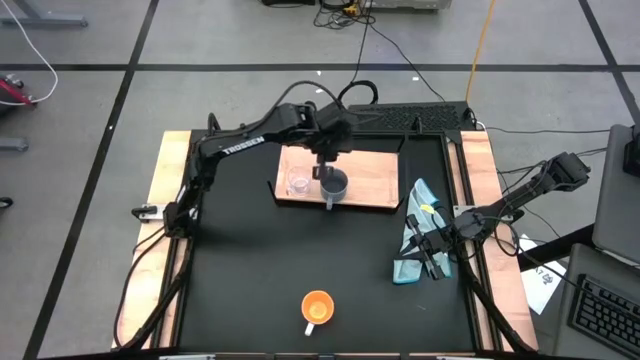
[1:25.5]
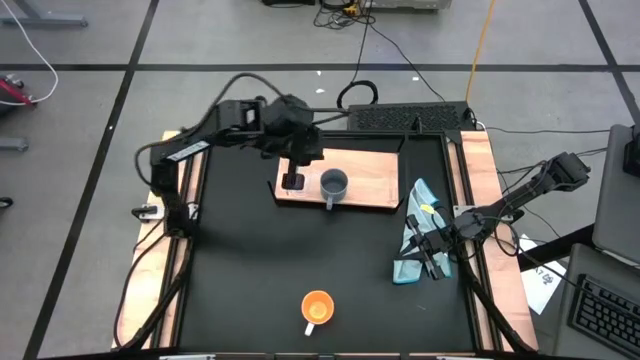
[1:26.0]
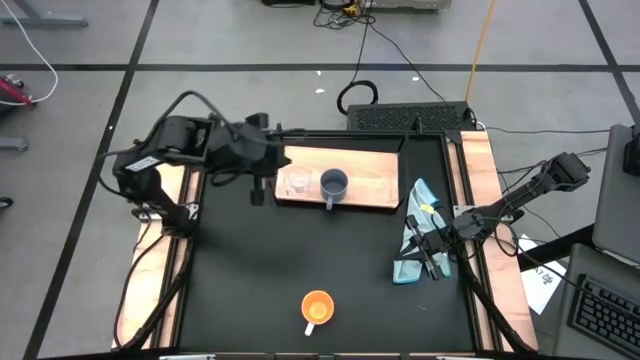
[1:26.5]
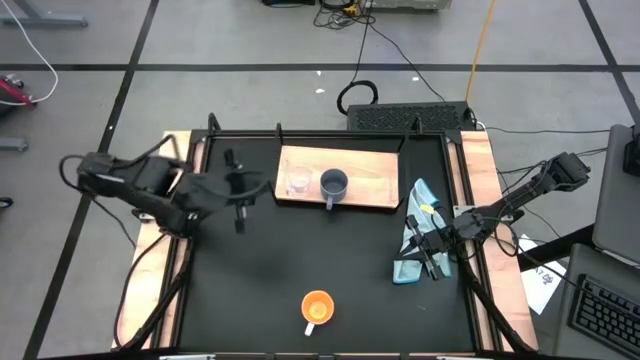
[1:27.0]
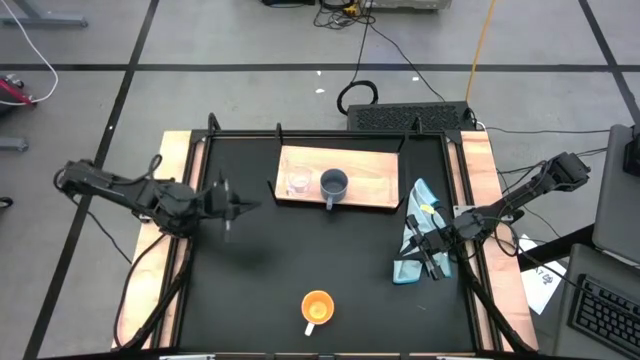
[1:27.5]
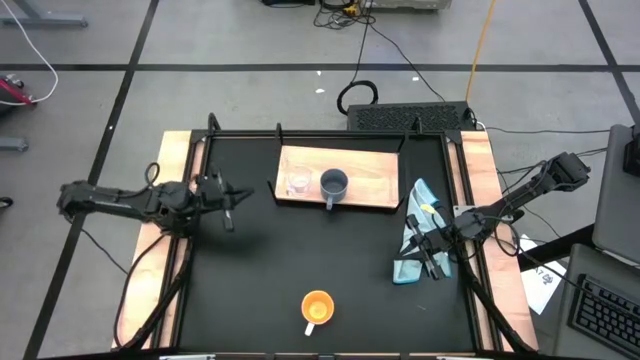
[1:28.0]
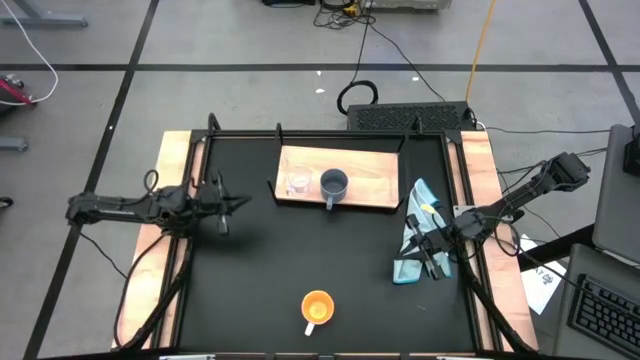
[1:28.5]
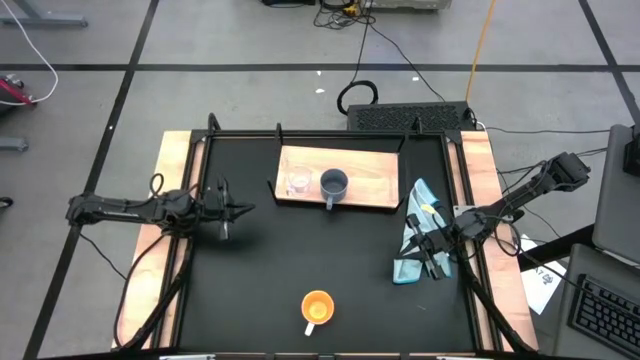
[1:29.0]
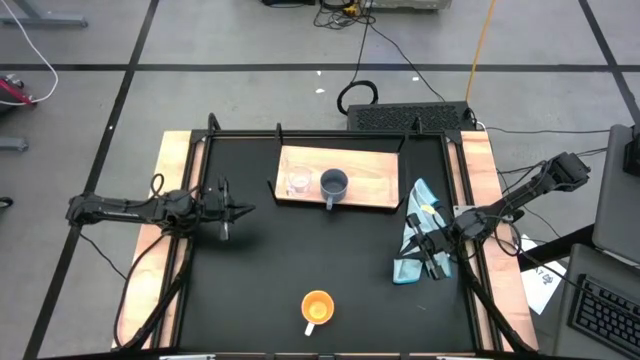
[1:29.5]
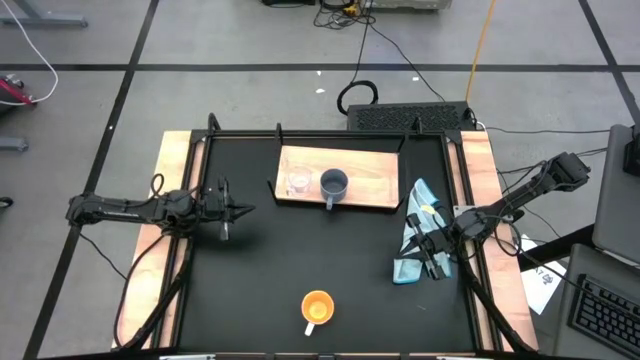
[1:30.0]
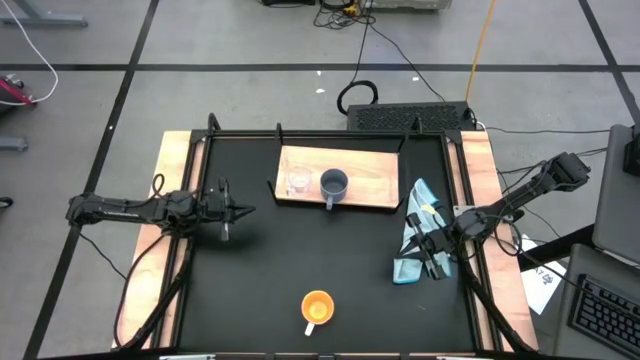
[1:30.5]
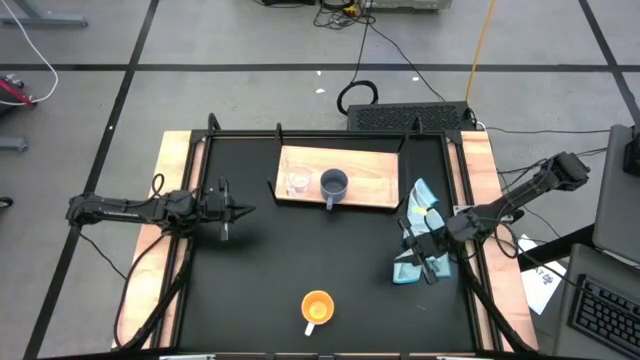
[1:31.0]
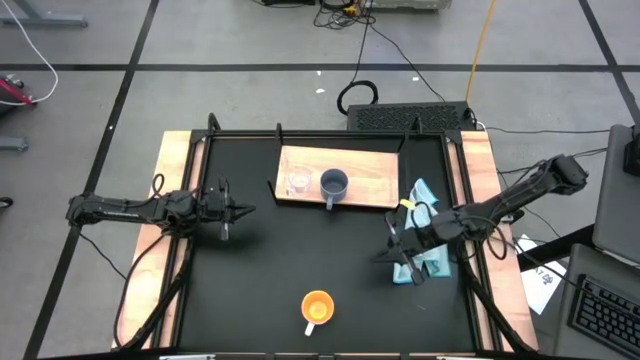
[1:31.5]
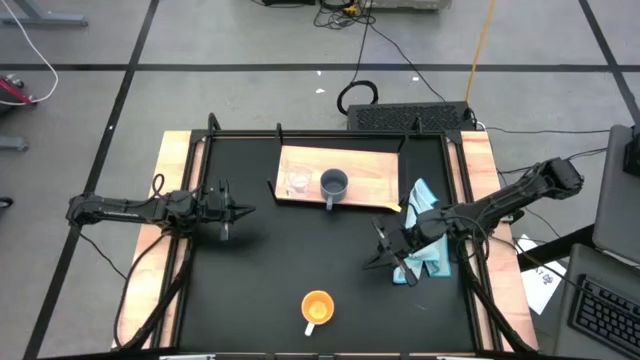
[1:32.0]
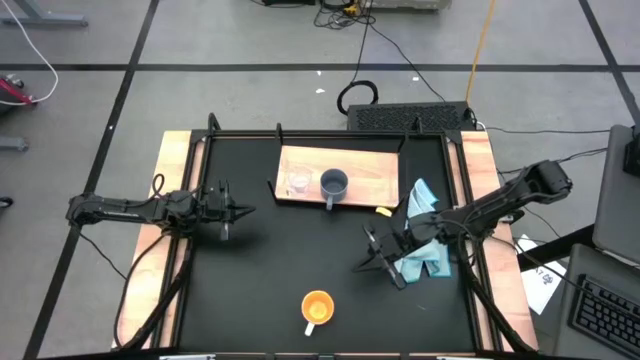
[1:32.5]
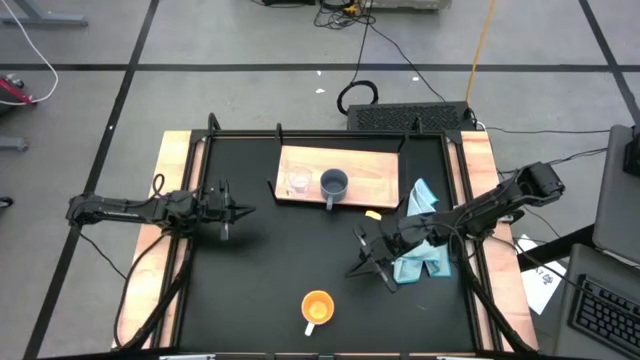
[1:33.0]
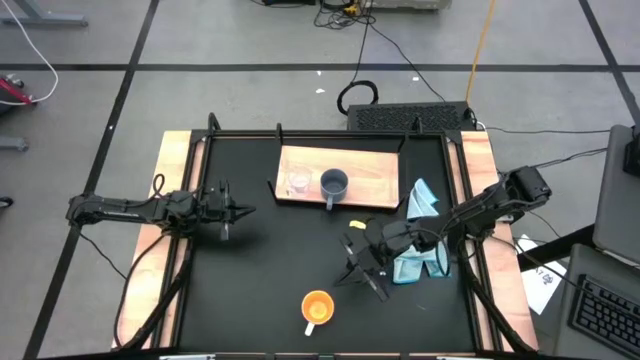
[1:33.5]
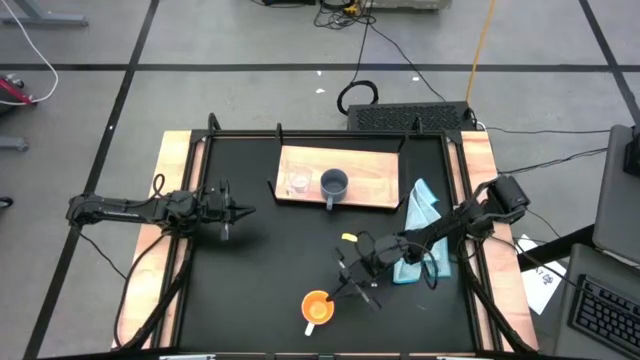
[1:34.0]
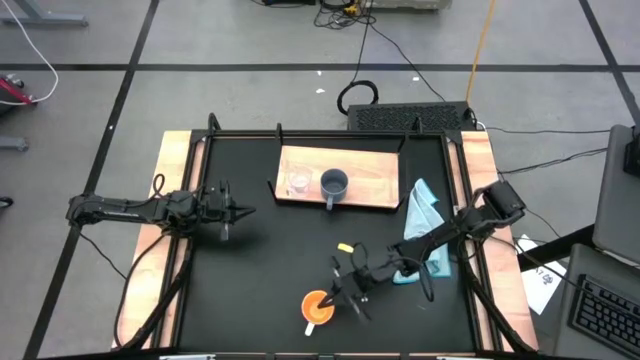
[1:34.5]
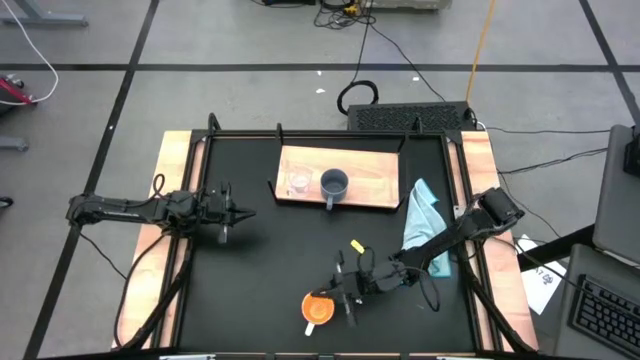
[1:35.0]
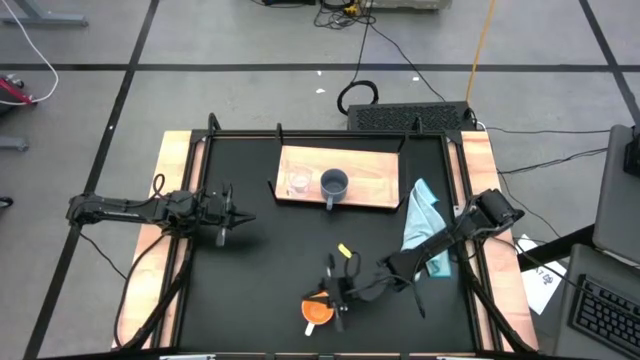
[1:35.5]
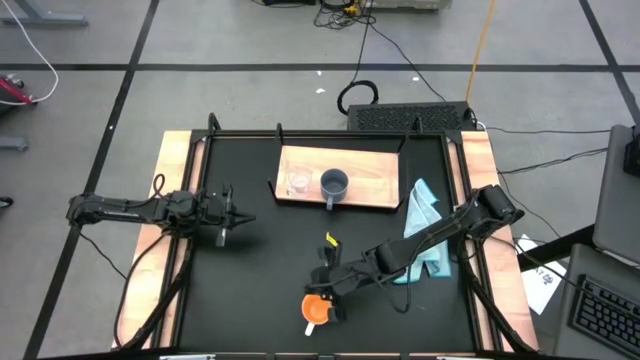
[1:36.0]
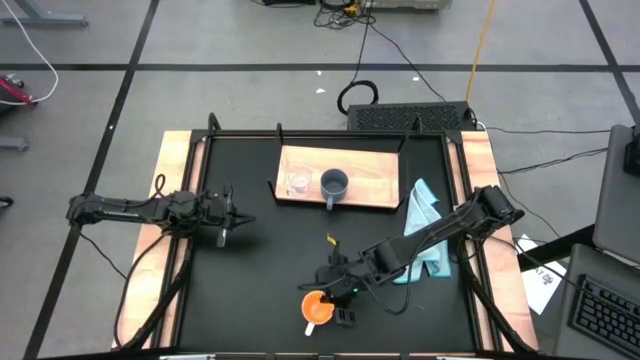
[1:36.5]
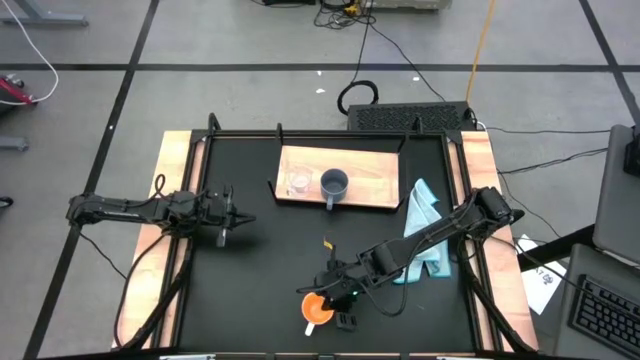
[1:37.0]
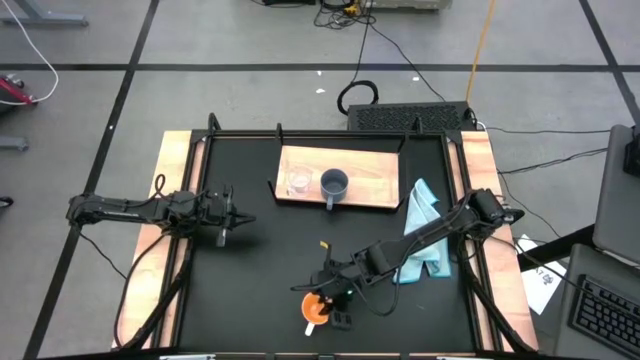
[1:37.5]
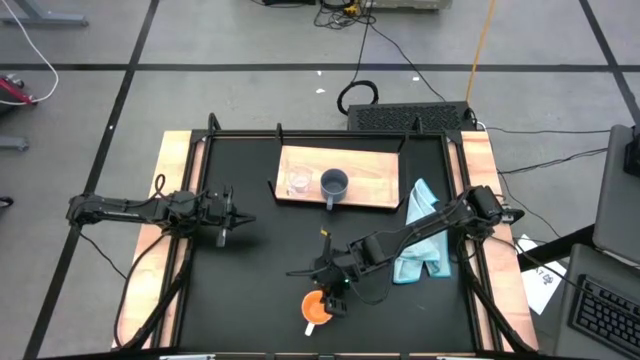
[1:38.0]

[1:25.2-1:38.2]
Task: Stack small to large cups/mugs on shelf
Put the yellow mug on the shelf

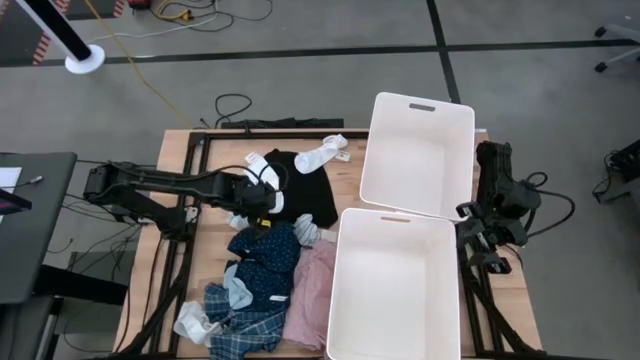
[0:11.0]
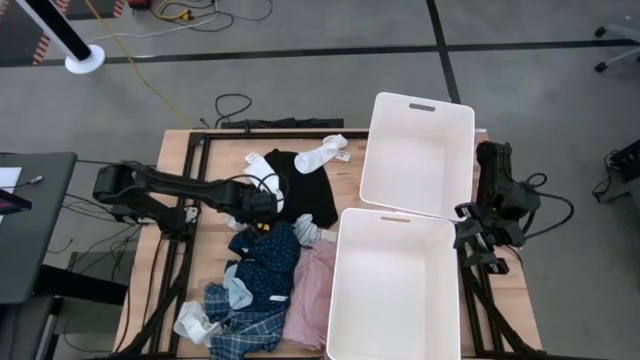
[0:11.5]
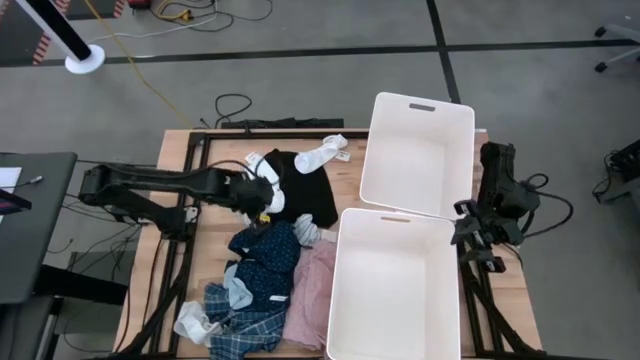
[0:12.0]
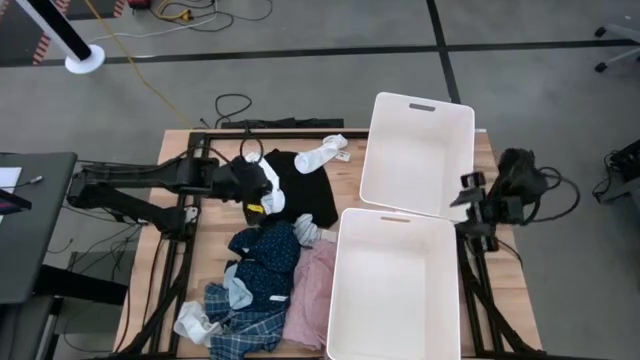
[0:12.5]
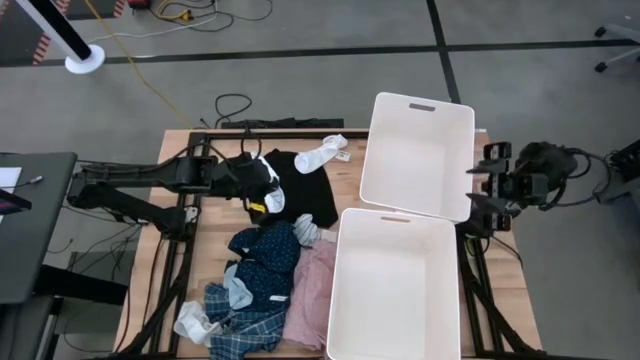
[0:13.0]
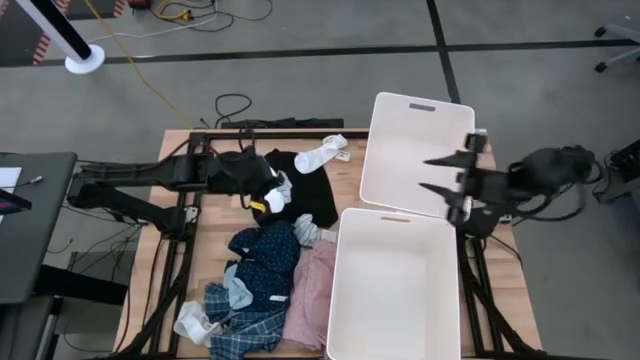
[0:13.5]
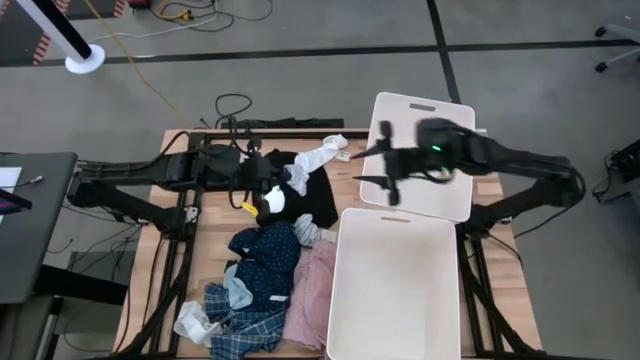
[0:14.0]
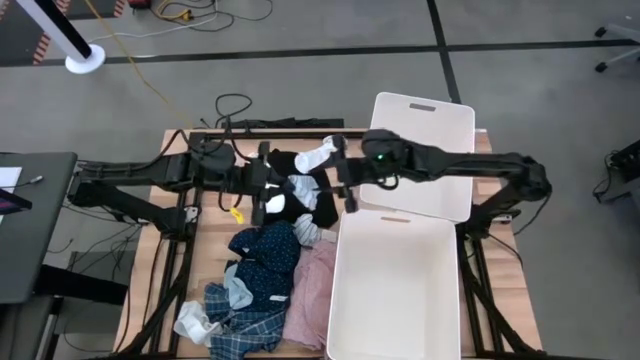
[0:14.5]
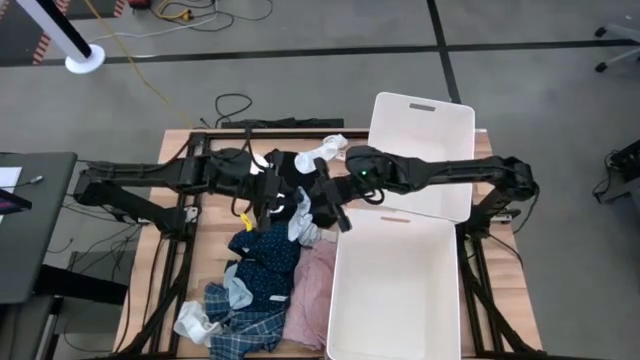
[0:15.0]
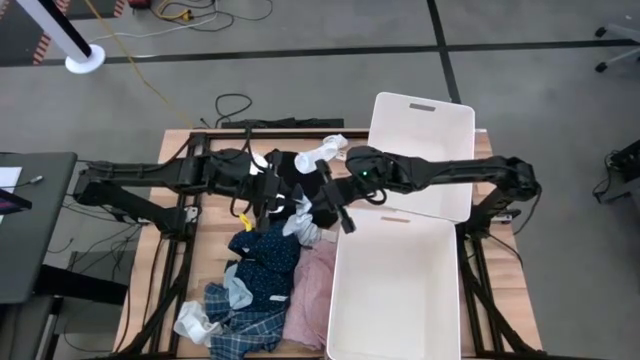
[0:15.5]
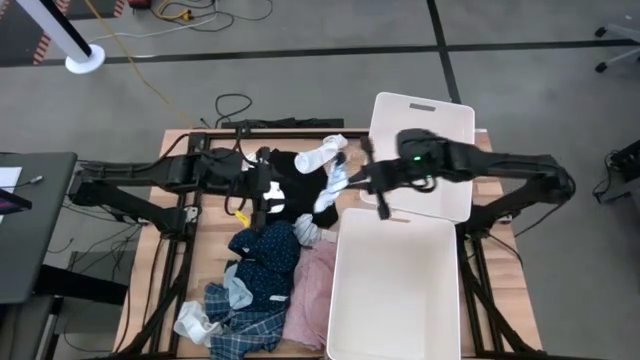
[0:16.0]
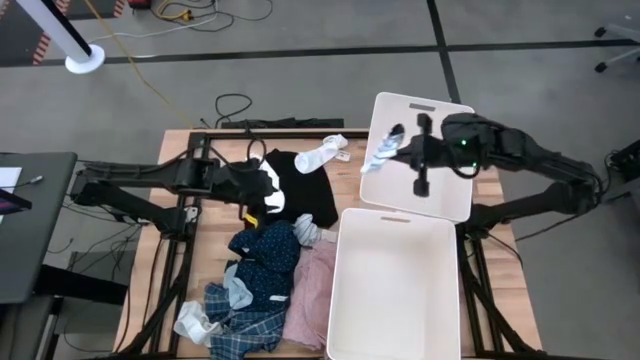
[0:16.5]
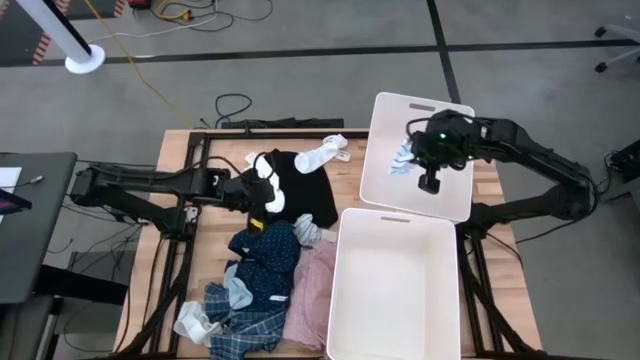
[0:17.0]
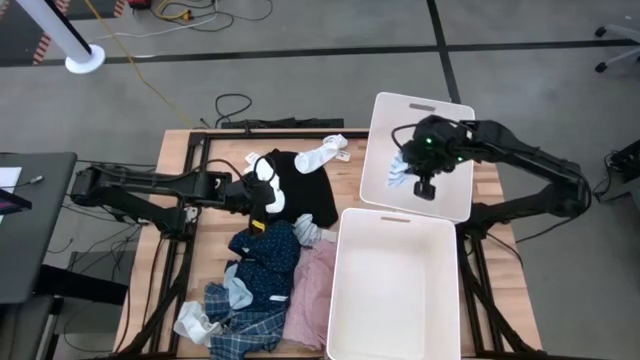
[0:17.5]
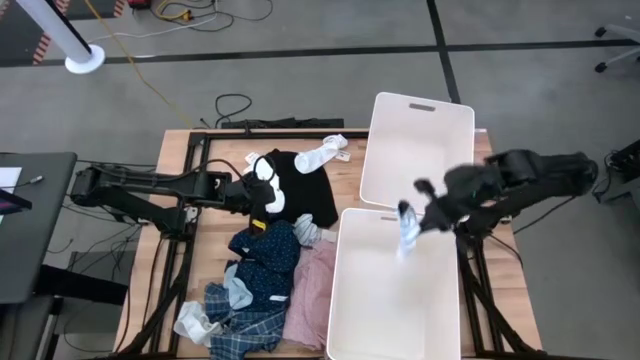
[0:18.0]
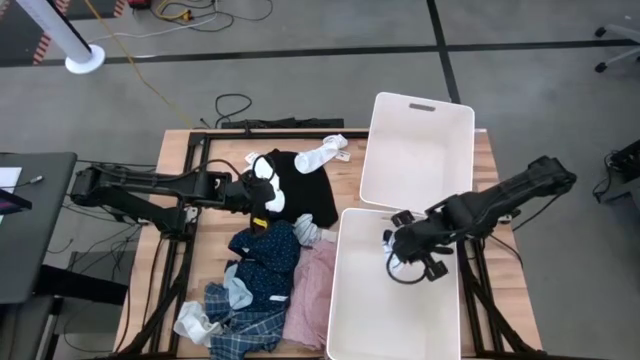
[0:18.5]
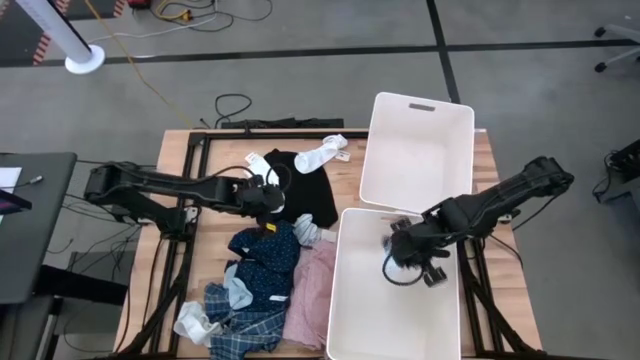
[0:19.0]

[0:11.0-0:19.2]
Task: Sort clothes
Put the left white striped sock into the bottom laundry bin
